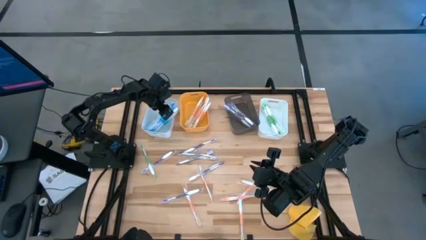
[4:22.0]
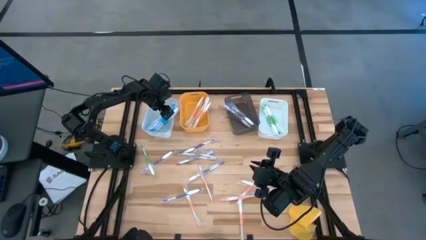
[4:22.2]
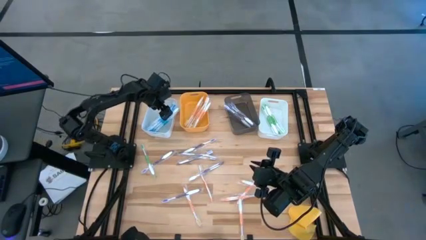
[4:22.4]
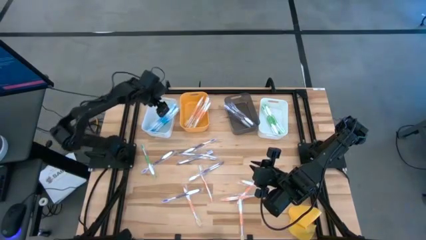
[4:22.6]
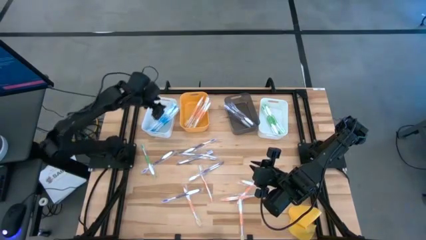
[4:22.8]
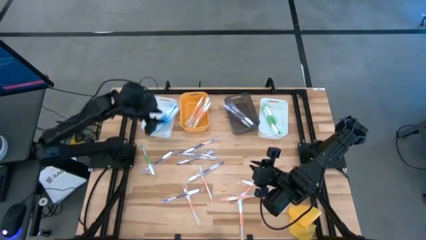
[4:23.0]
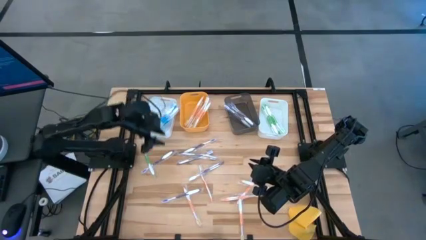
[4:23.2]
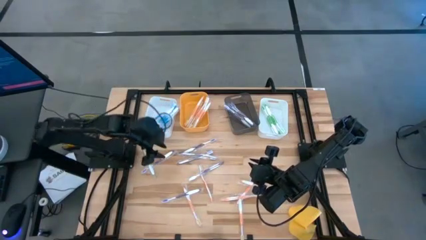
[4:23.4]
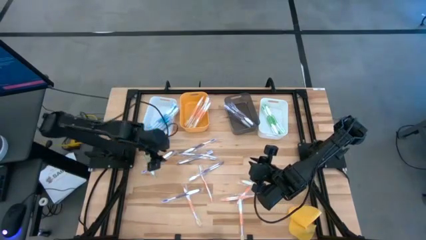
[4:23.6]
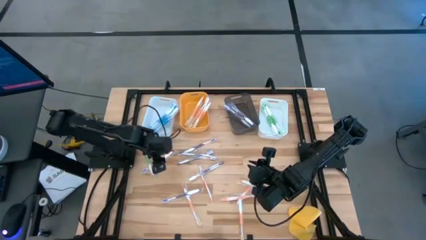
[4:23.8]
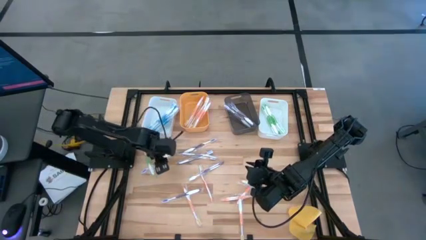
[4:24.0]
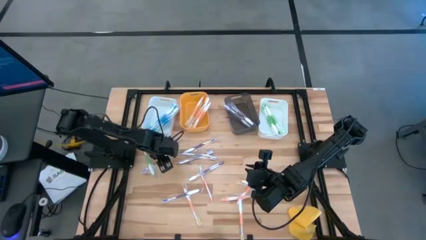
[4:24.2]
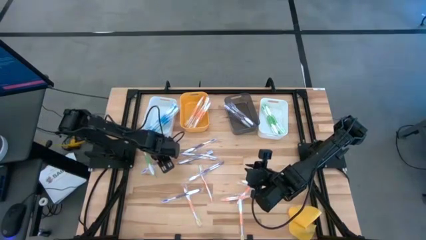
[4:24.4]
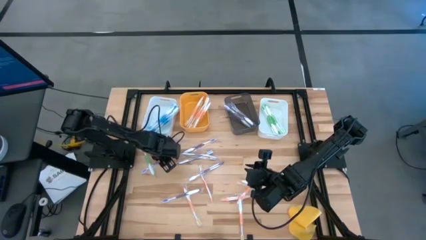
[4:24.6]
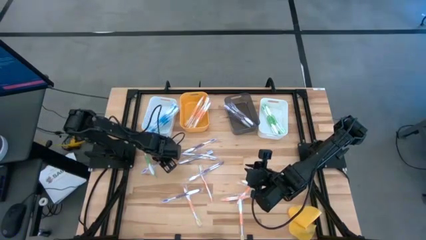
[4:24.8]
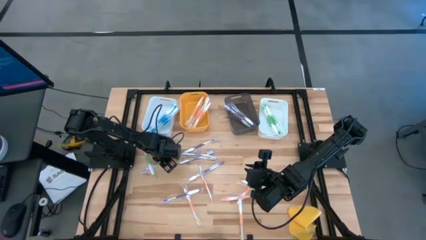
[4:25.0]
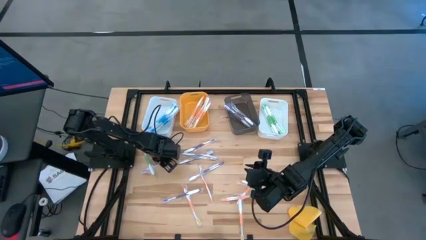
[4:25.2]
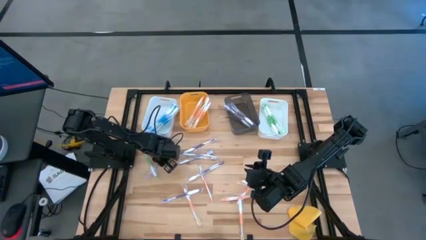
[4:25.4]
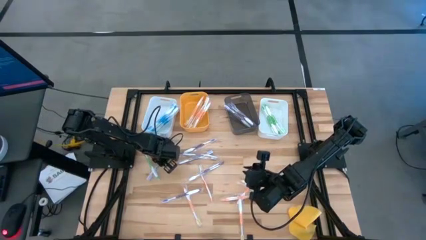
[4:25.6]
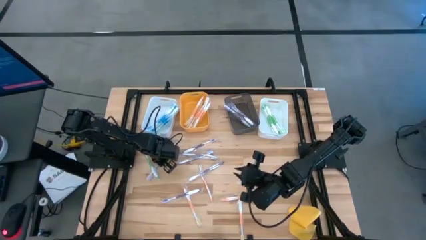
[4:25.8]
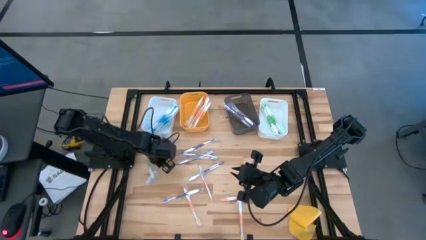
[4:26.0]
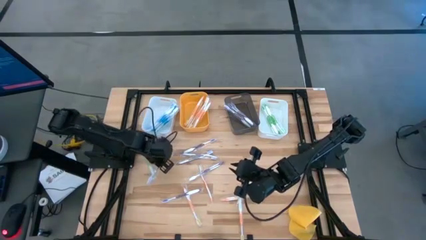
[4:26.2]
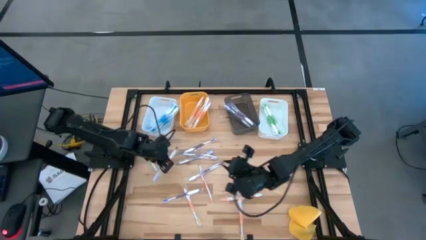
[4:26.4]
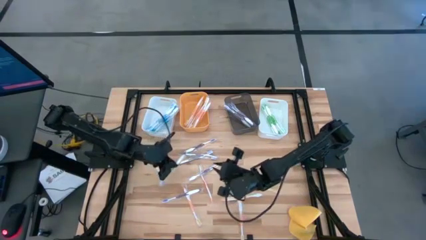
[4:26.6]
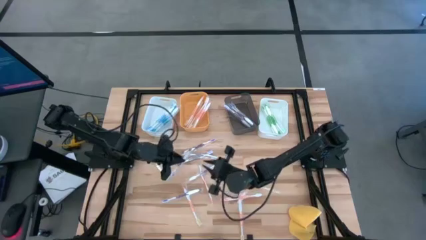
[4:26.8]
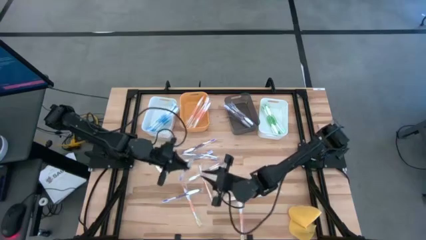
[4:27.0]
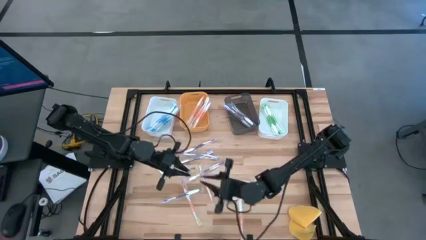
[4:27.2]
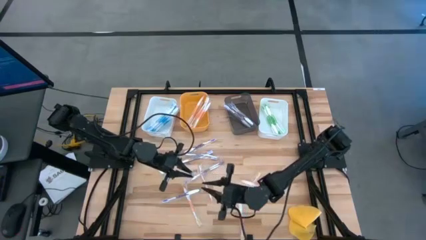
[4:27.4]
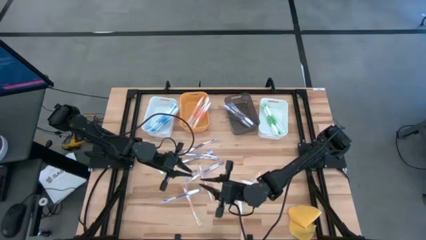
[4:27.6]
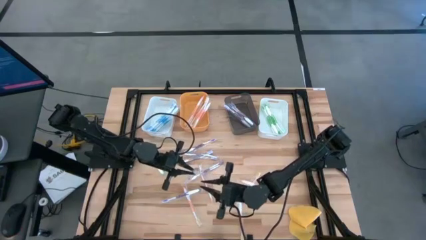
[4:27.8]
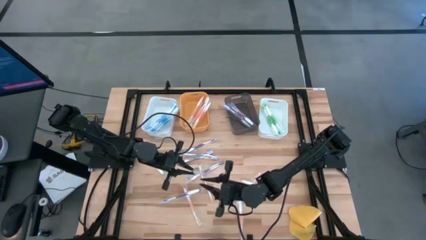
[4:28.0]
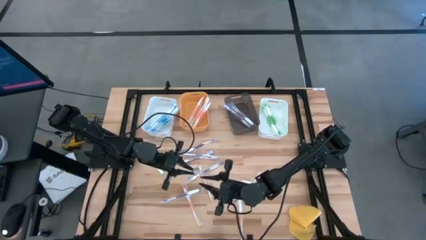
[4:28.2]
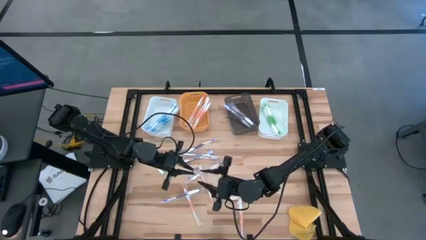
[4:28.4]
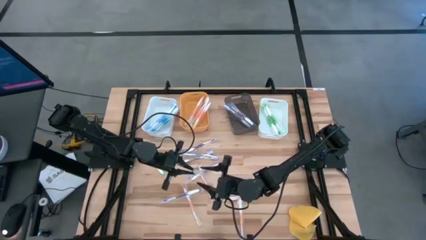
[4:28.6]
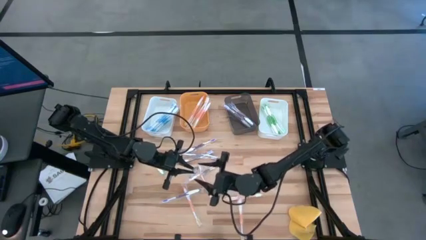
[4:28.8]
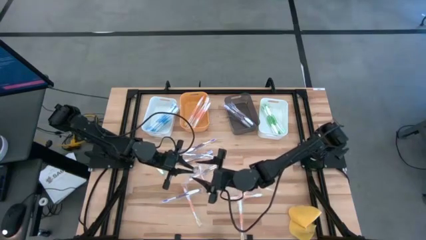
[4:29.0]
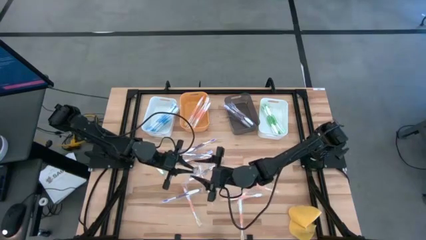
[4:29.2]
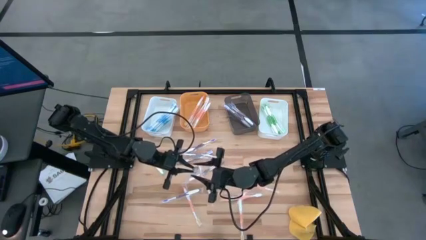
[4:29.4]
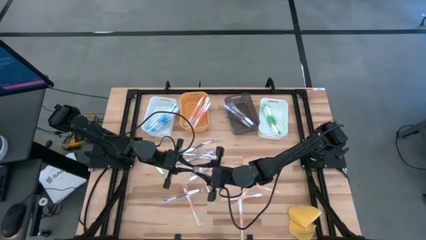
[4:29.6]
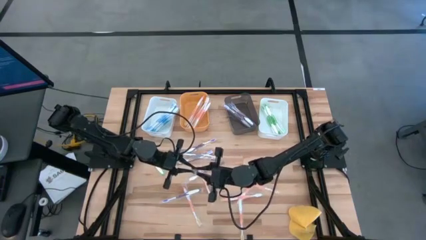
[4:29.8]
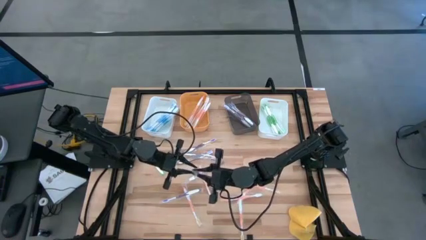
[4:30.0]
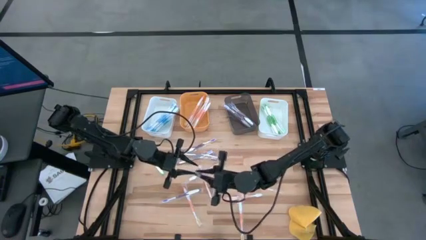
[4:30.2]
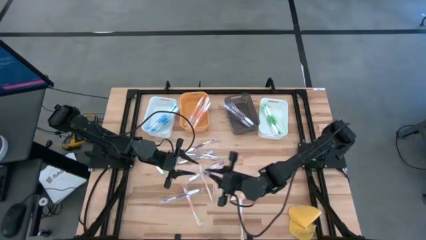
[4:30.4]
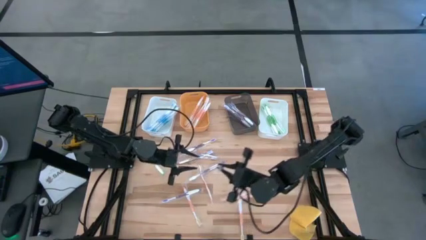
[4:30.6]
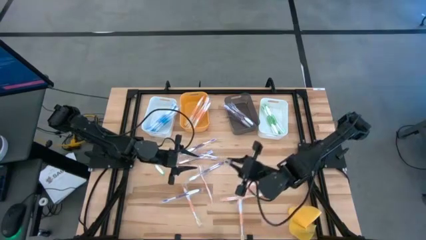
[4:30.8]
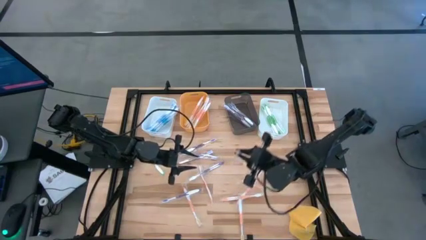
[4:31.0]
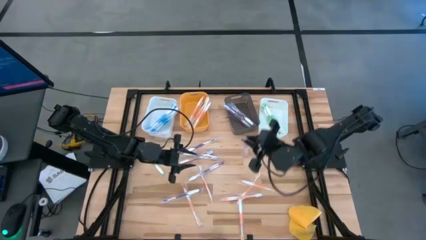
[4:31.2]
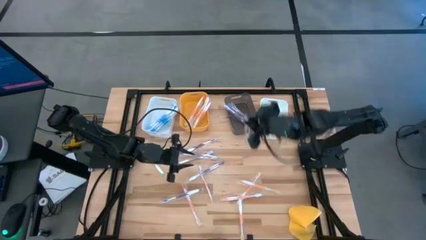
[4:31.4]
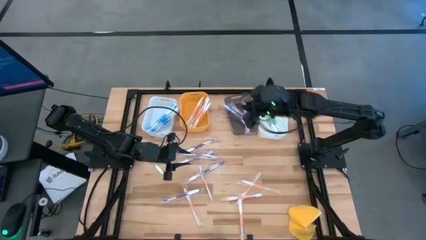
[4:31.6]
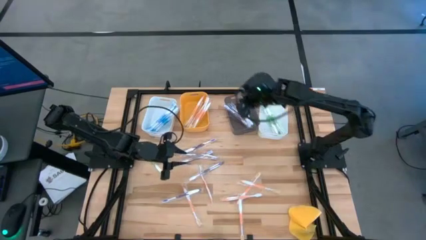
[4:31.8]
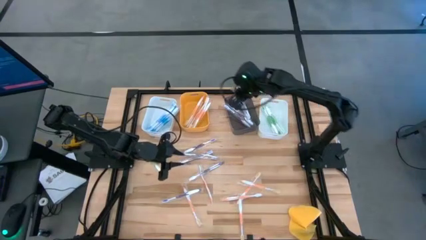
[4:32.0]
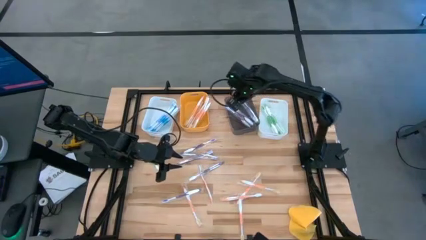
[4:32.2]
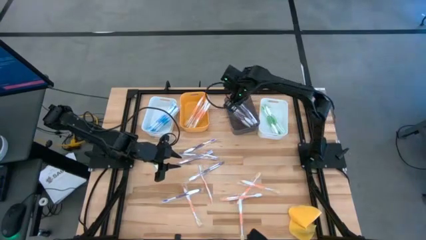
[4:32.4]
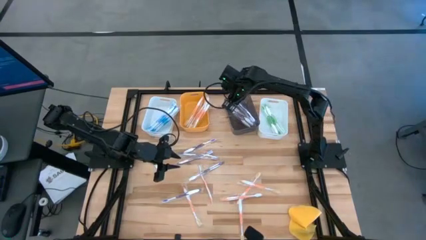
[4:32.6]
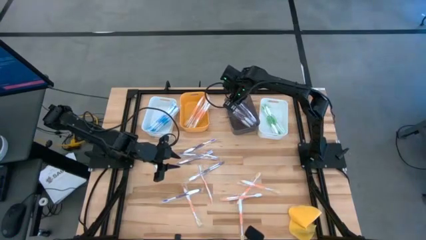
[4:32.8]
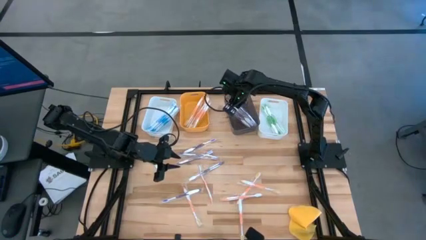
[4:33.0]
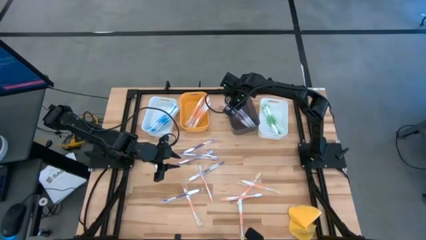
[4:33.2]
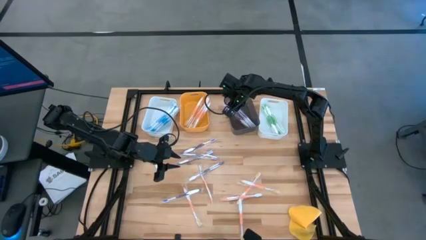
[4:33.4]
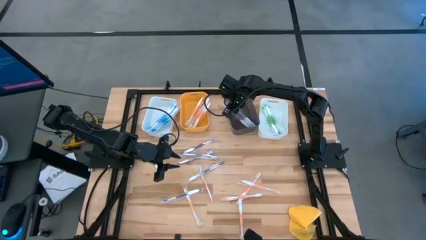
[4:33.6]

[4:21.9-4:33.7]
Task: Pick & Place Toothbrushes
Put the violet toothbrush into the gray bin

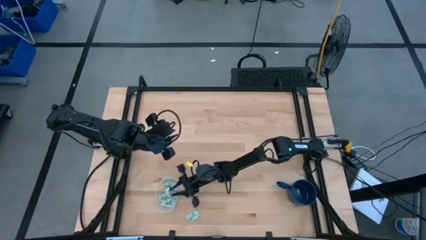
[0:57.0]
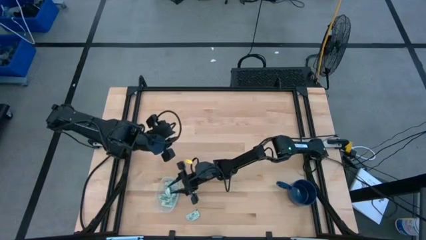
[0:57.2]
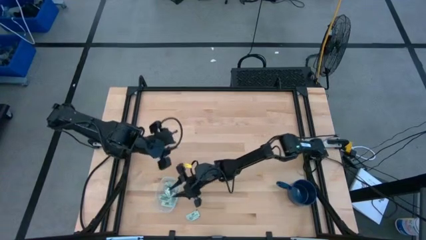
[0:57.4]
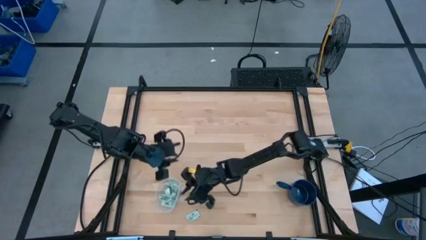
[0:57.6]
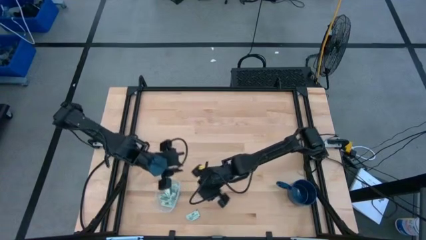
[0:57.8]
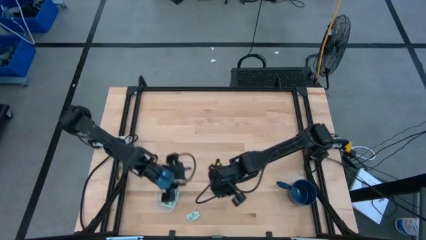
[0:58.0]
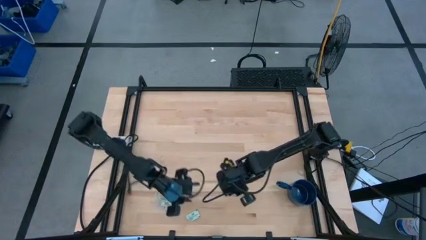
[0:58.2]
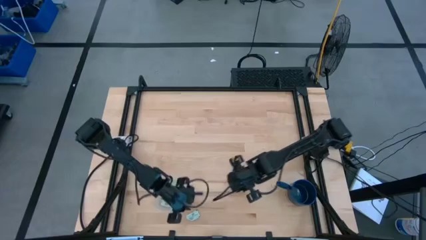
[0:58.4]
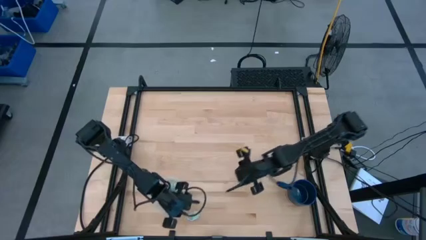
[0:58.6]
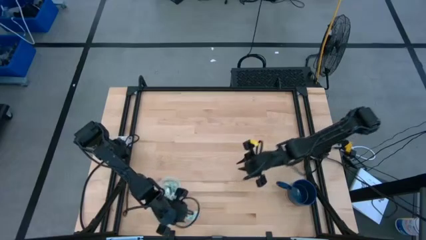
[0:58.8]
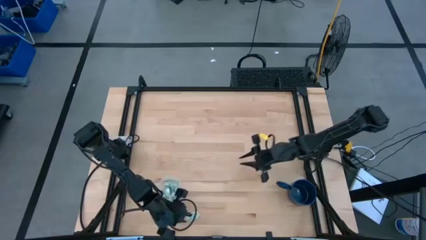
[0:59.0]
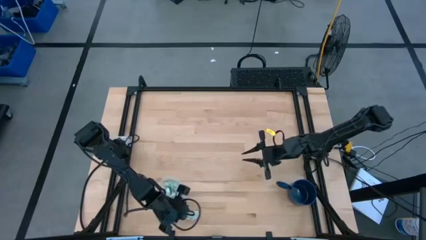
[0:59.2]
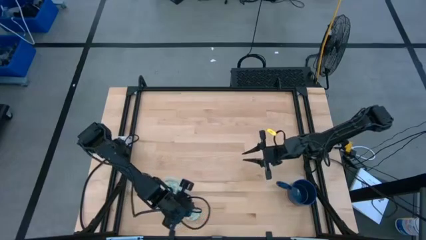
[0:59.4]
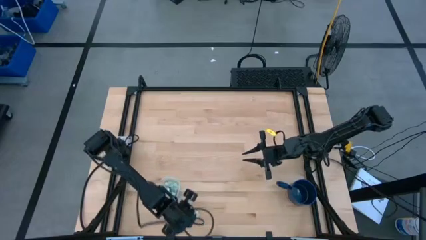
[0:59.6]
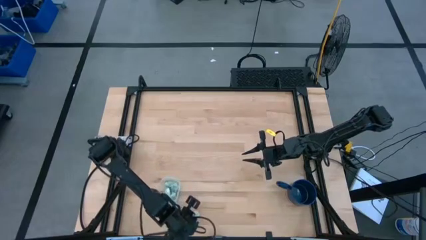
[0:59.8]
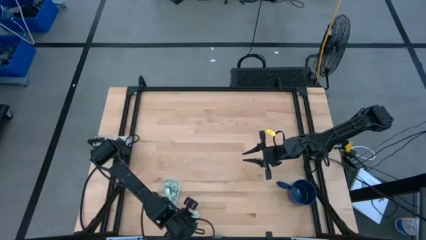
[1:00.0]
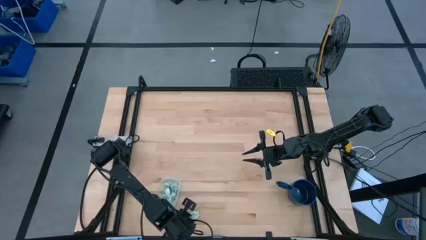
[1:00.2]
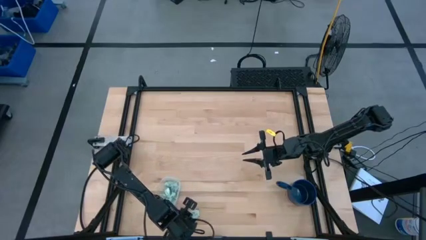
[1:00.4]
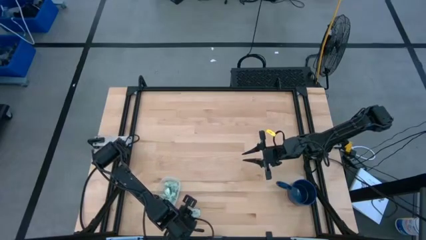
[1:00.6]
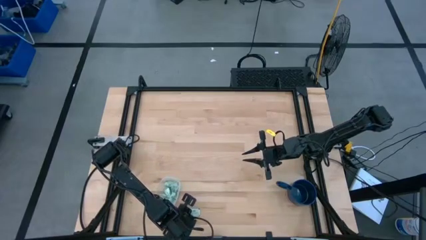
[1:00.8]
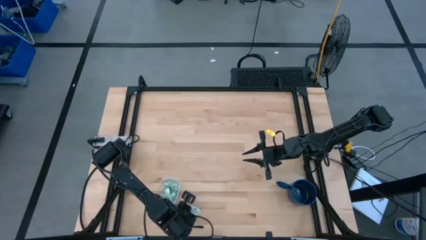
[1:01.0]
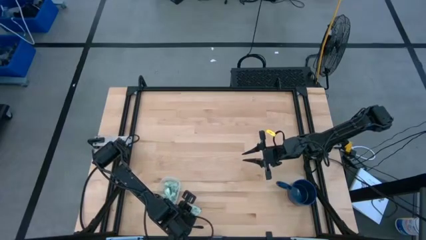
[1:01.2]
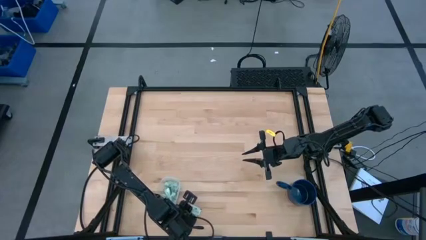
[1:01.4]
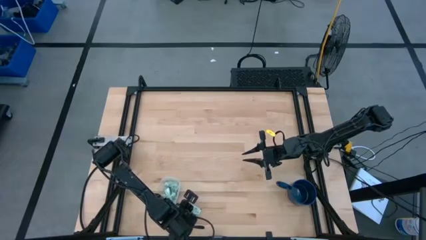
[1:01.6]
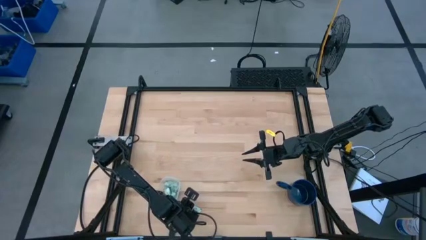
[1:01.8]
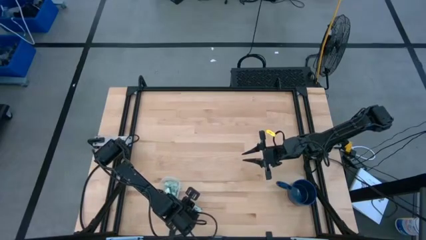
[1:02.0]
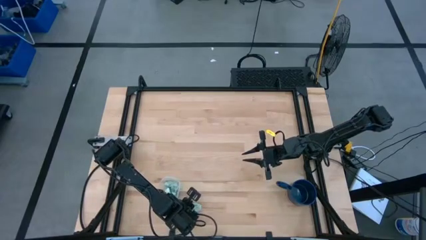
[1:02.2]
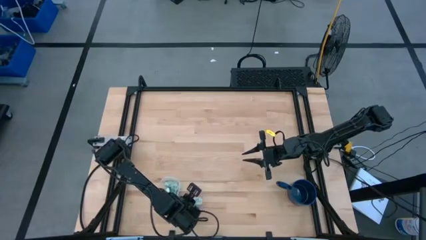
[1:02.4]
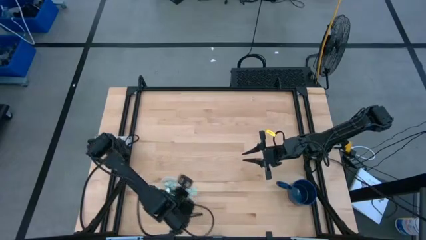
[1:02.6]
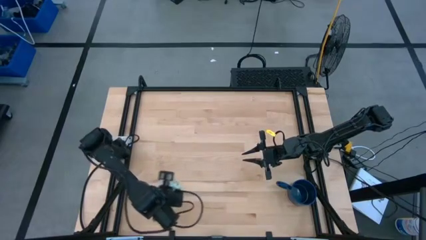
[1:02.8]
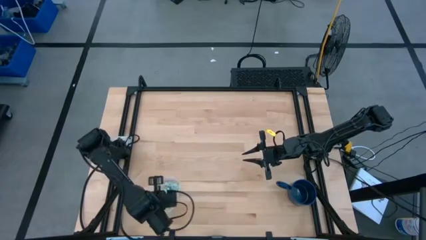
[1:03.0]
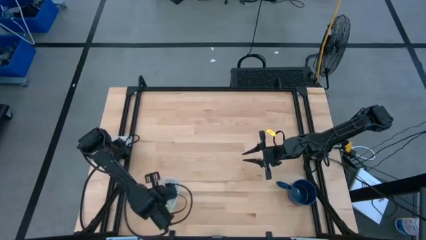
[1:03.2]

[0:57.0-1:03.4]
Task: Pick and place Stevia / Truvia into bins
Put the stevia packet into the transparent container
